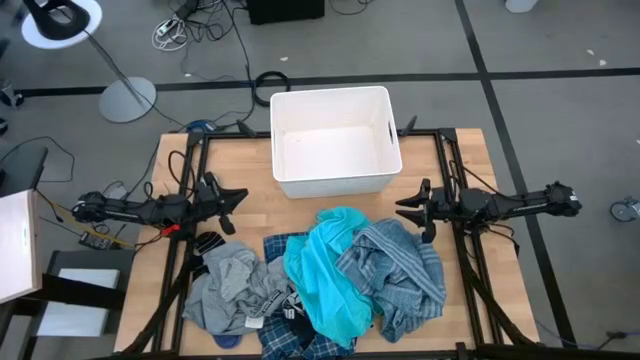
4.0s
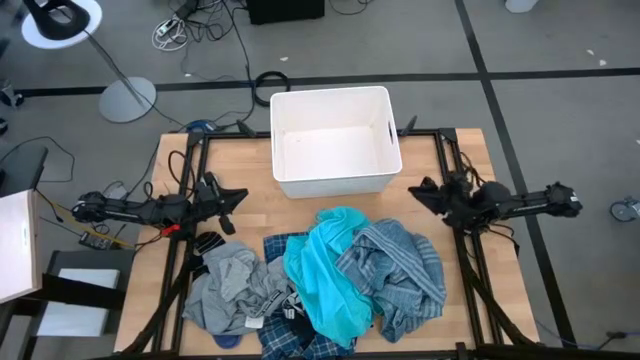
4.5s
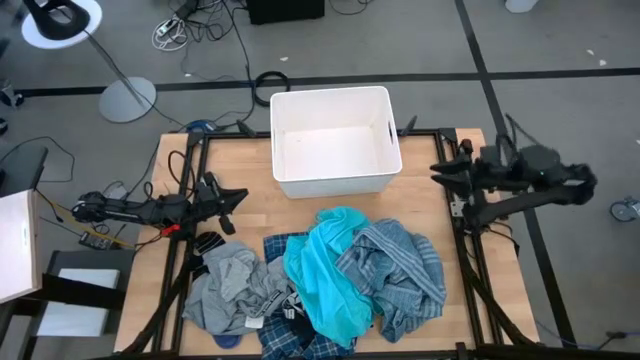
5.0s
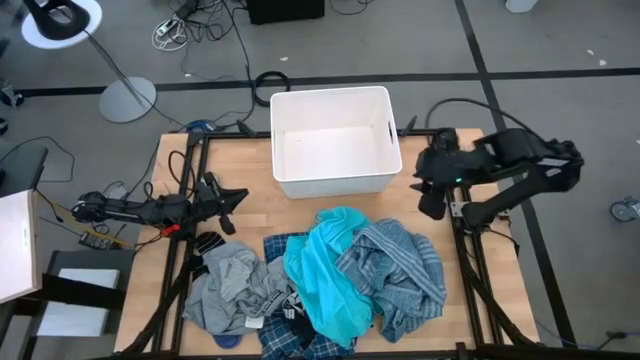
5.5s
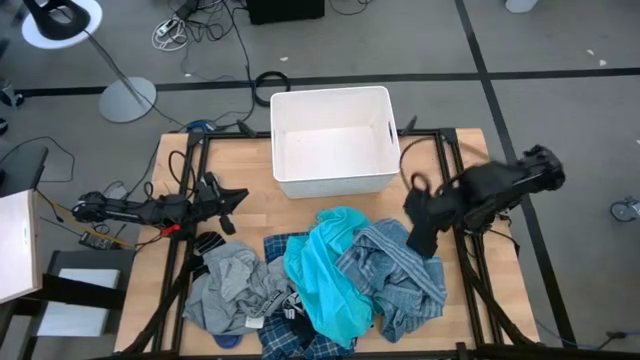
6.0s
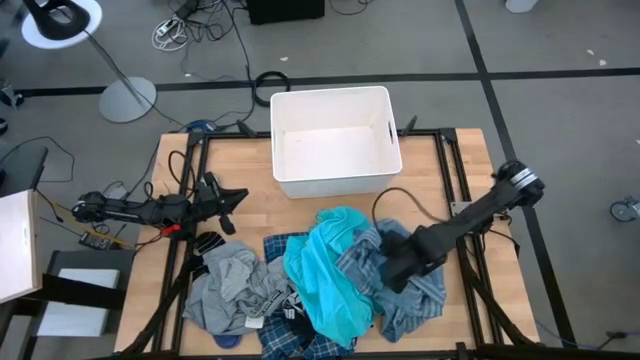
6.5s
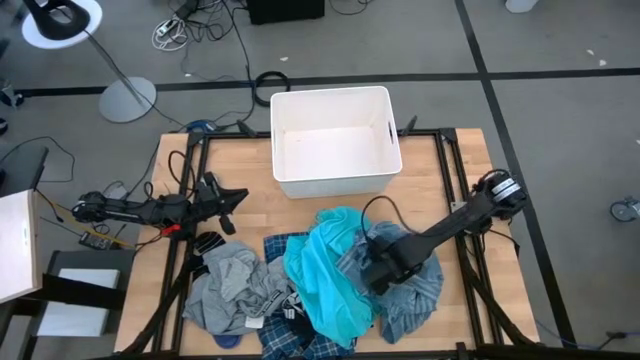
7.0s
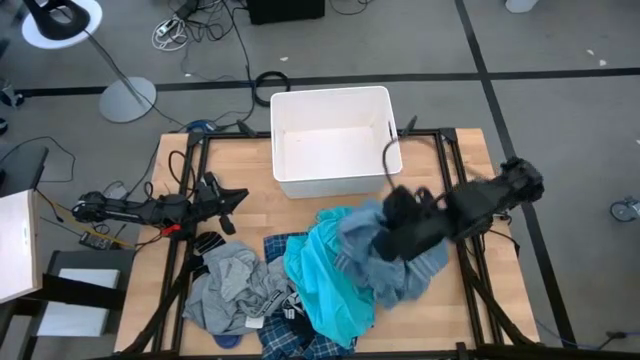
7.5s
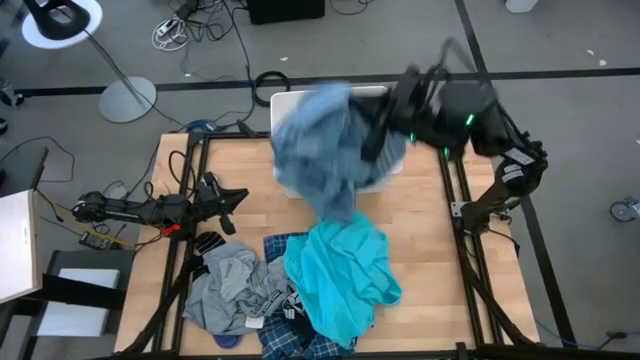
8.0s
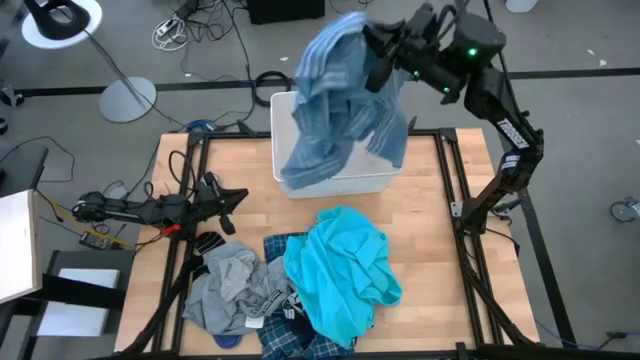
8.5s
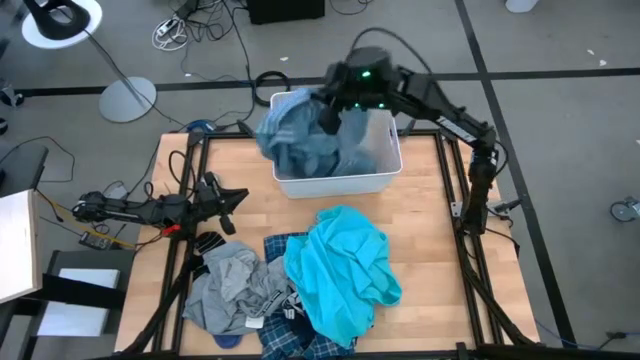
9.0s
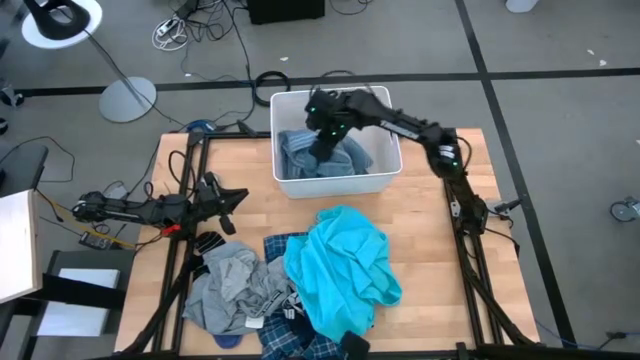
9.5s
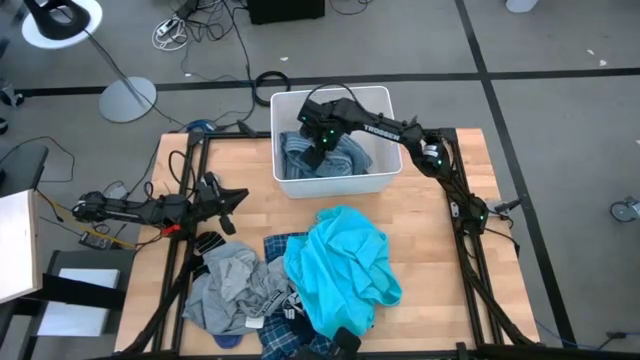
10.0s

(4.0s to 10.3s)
Task: Sort clothes
Put the light blue polo shirt into the laundry bin

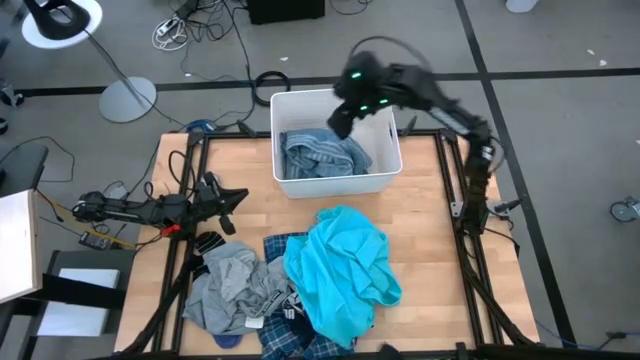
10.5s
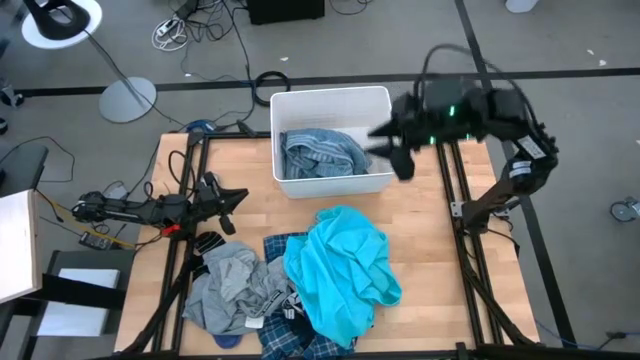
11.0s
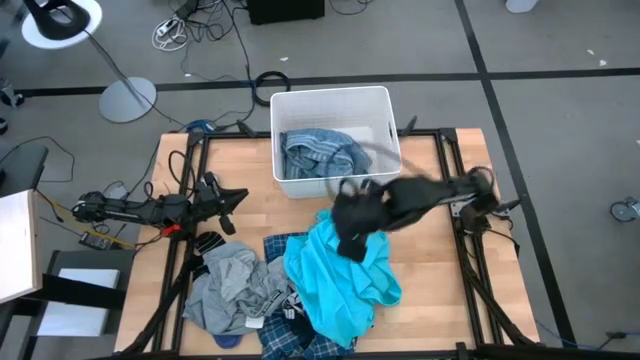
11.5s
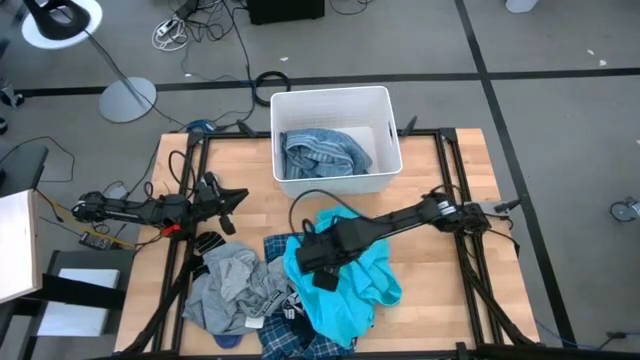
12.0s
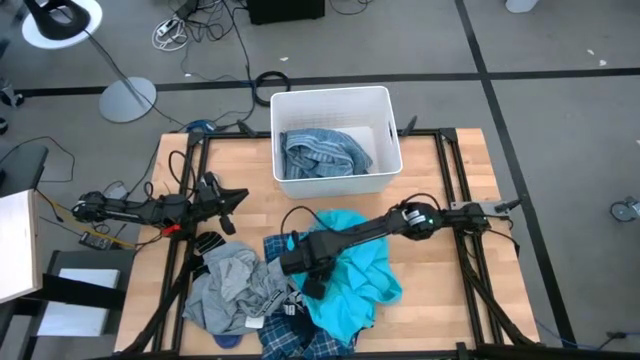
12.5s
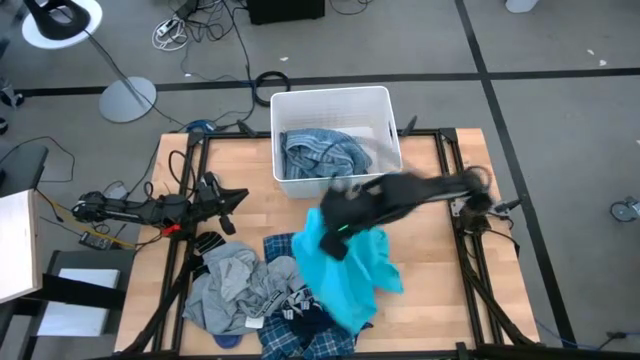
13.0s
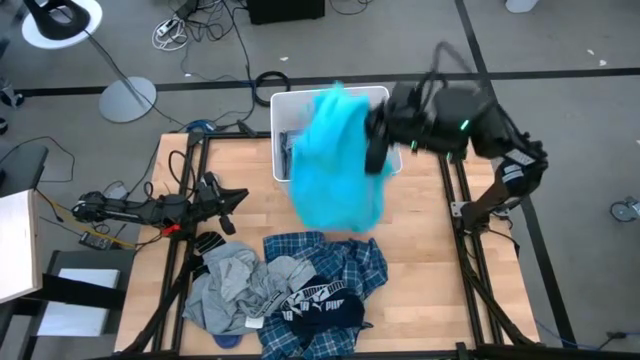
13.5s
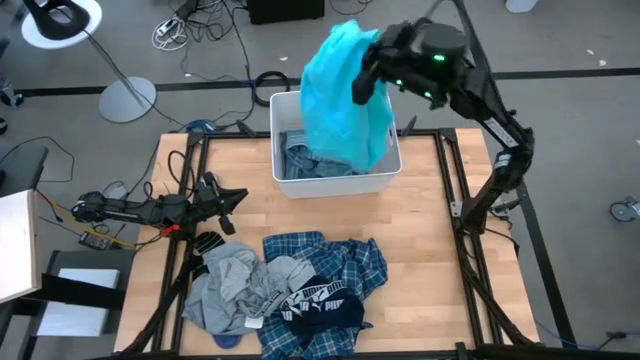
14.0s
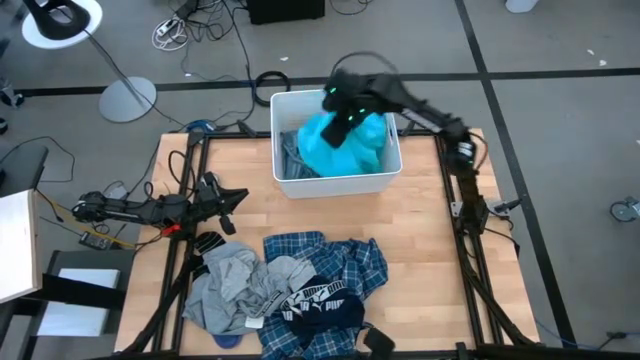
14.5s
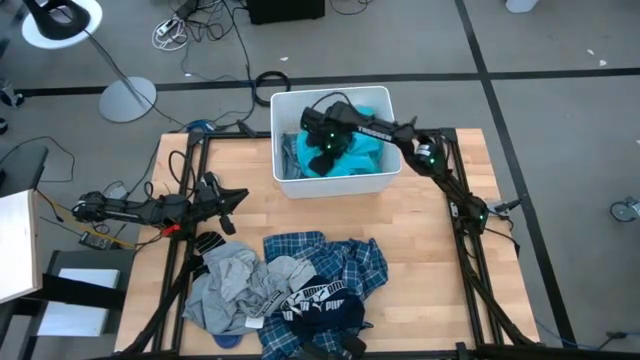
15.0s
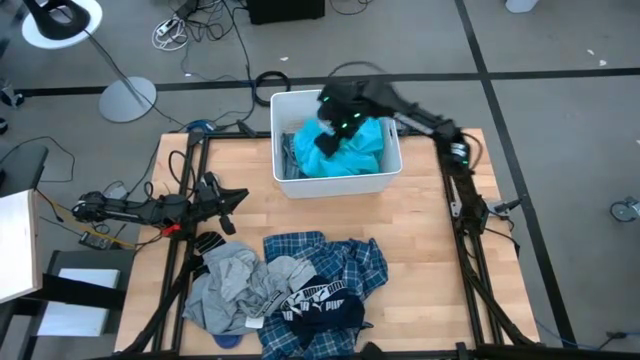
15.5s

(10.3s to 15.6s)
Put the blue shorts into the laundry bin

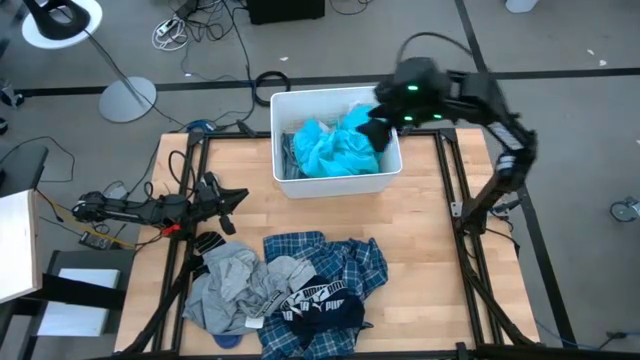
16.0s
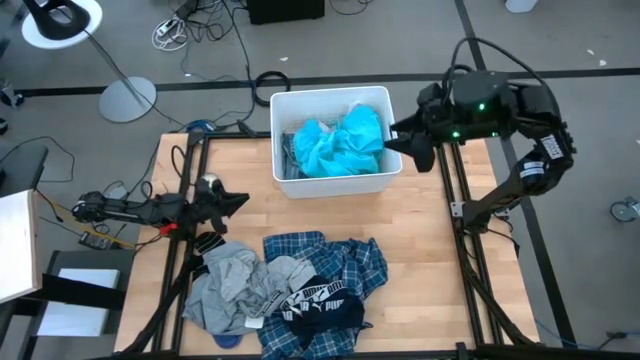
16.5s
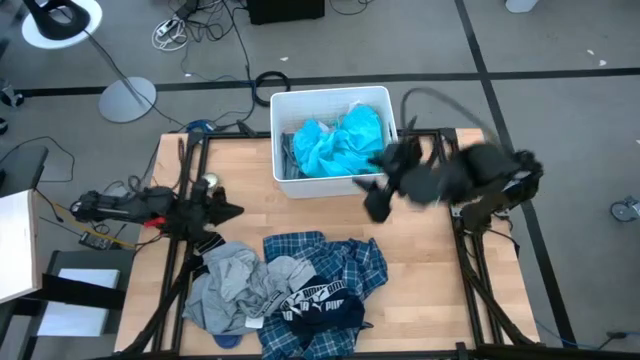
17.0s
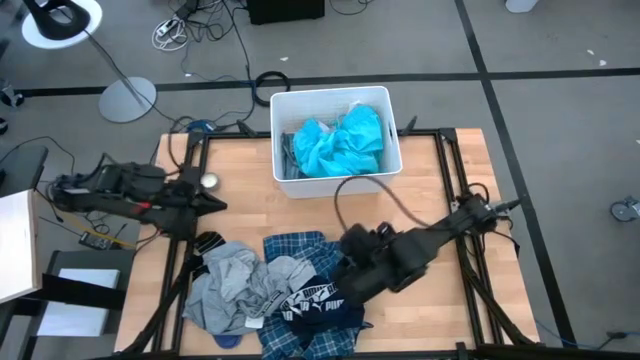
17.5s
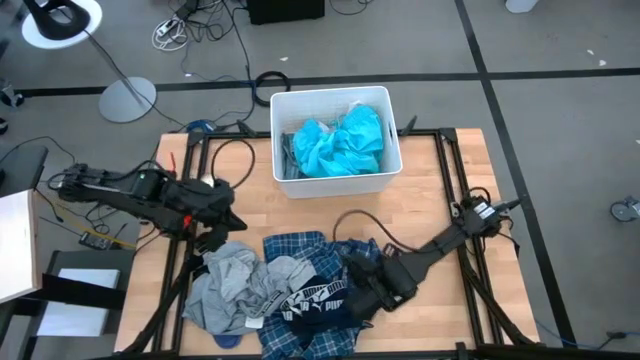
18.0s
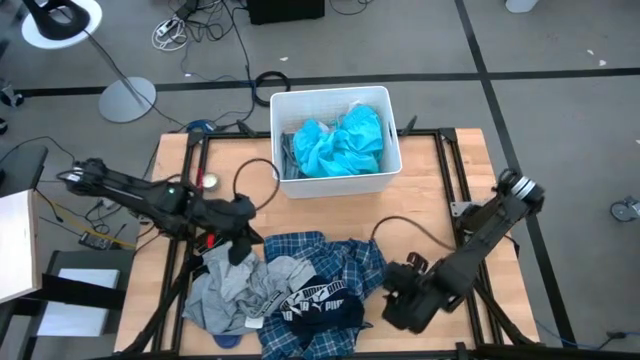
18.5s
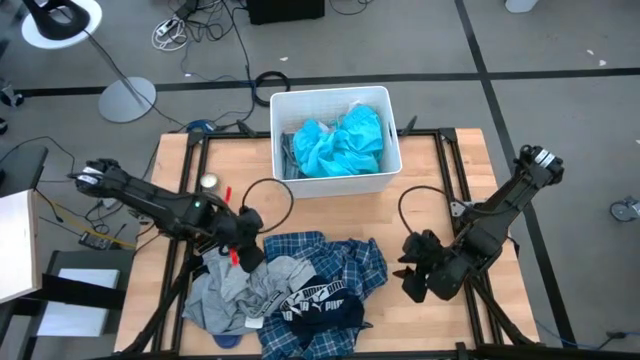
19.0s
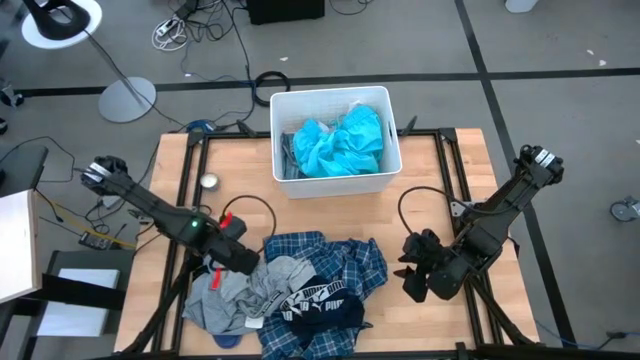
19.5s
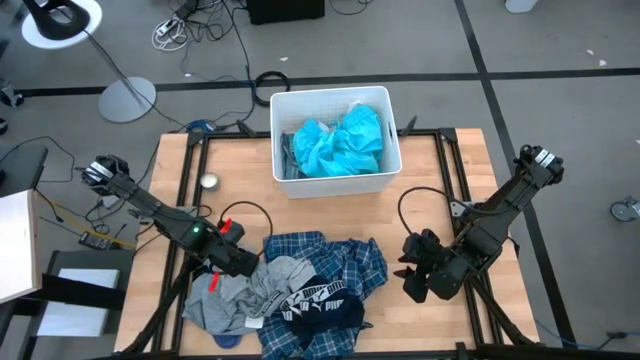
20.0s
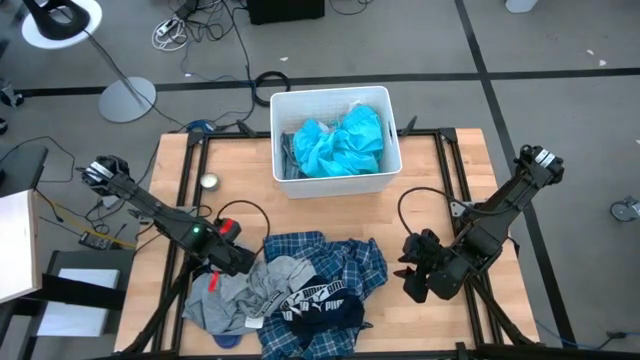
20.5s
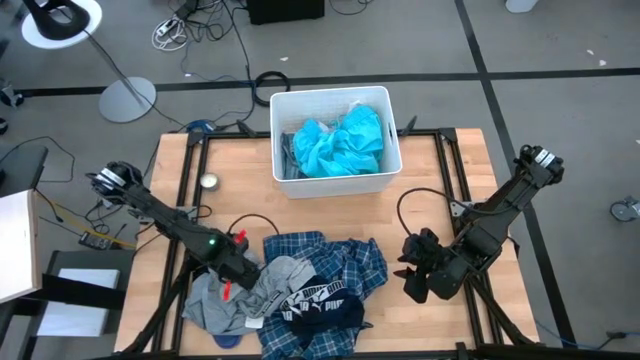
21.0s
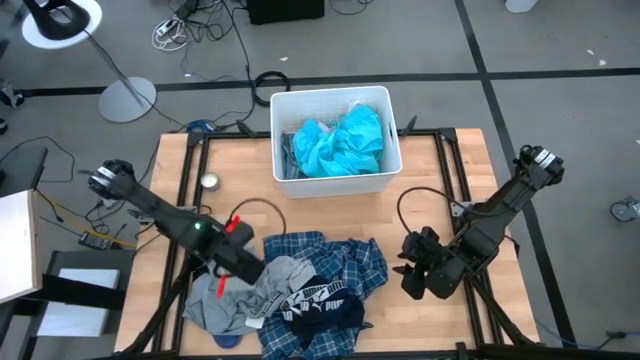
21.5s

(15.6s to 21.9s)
Put the left gray sock into the laundry bin

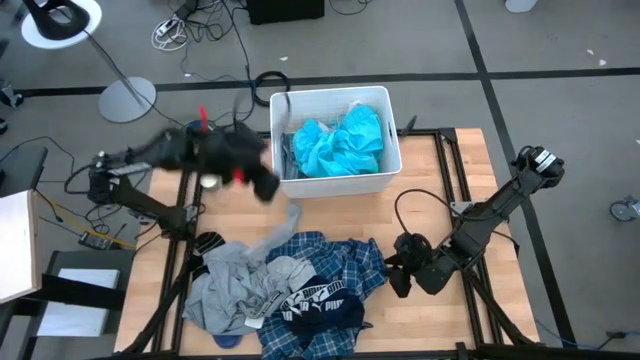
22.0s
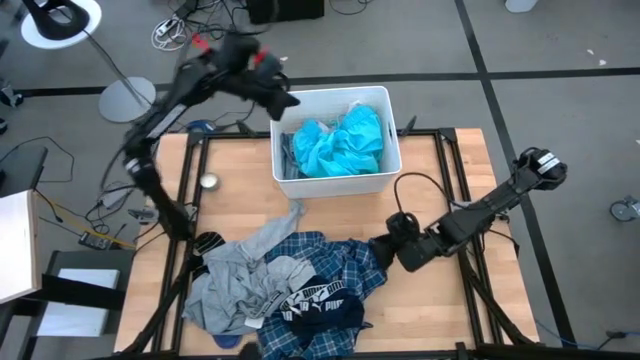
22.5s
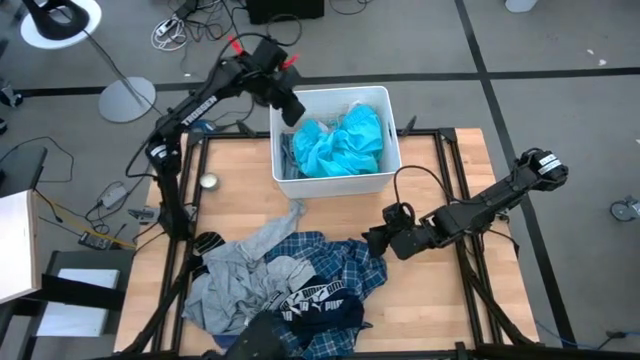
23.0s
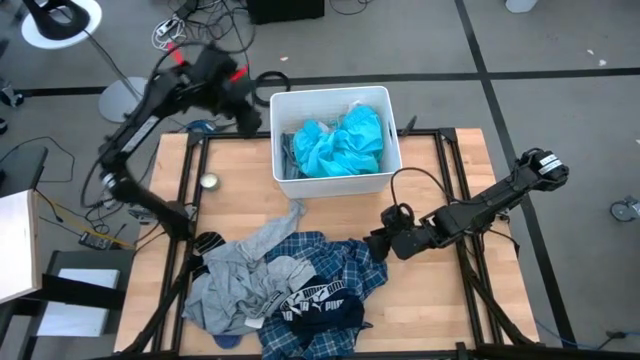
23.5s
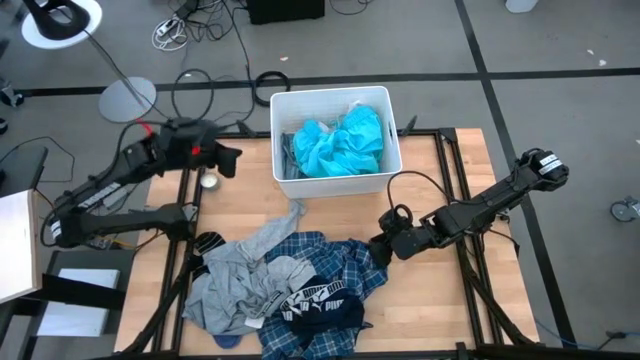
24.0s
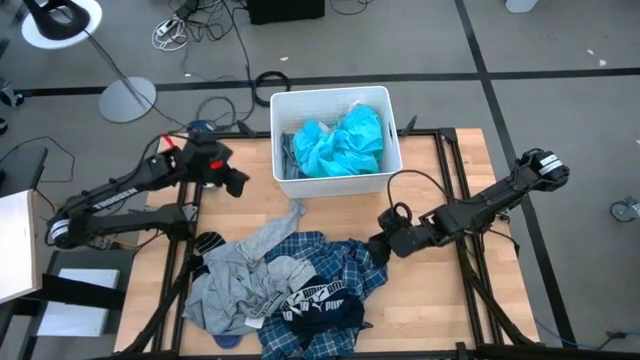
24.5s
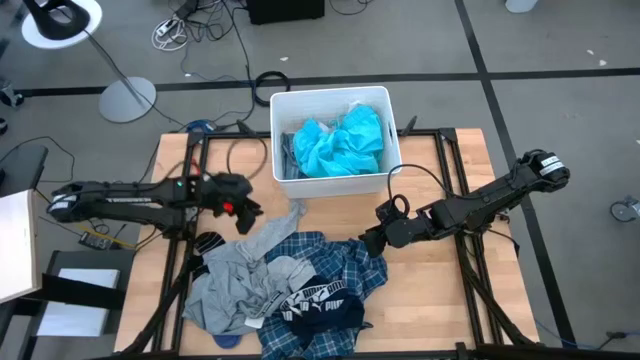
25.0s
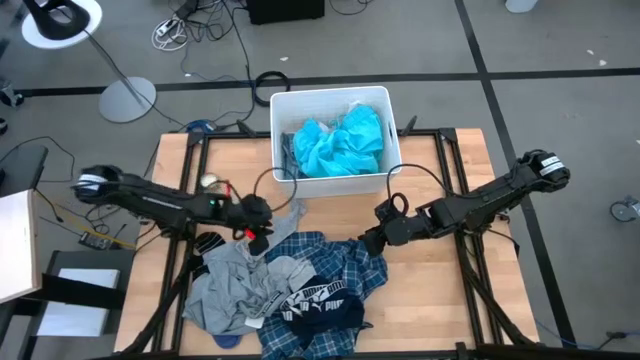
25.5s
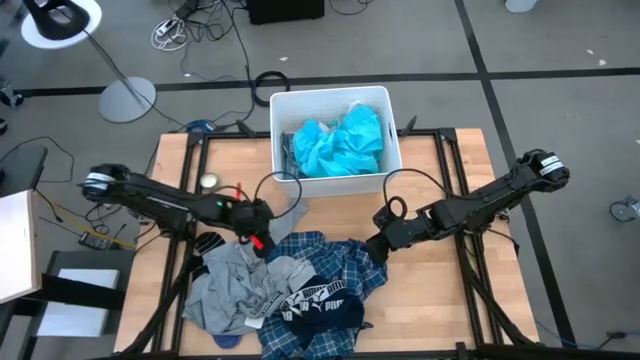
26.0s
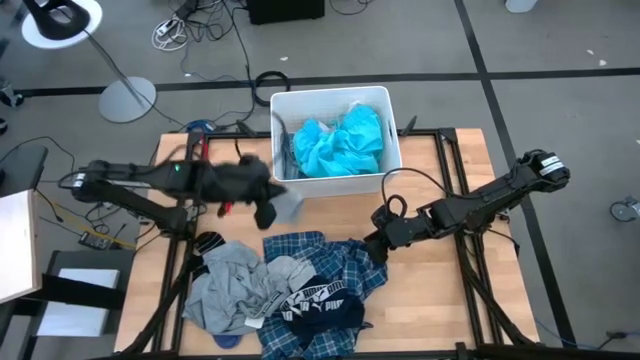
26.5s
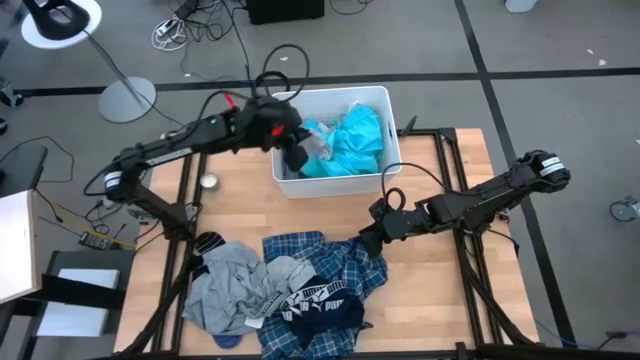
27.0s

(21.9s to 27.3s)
Put the top gray sock into the laundry bin
